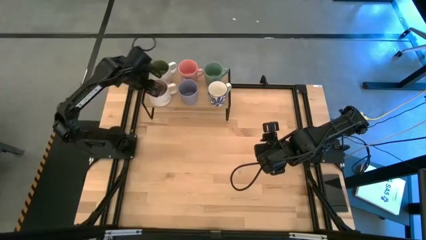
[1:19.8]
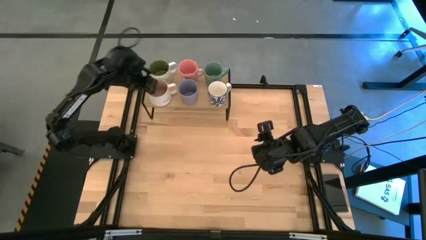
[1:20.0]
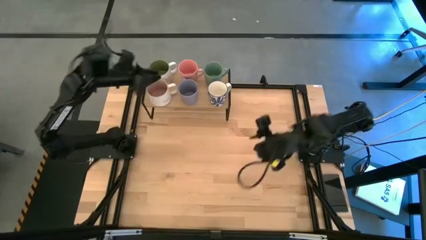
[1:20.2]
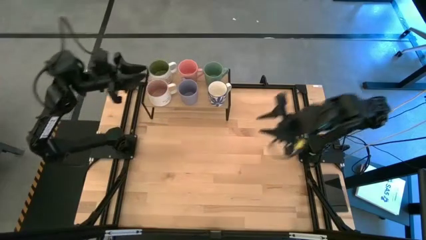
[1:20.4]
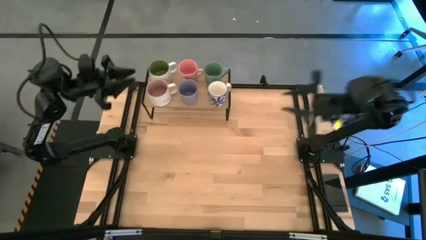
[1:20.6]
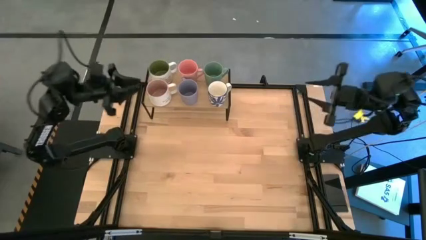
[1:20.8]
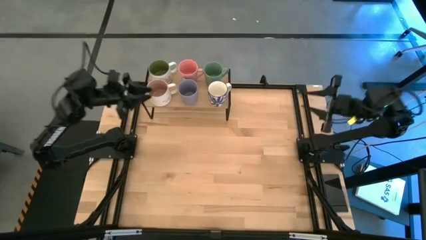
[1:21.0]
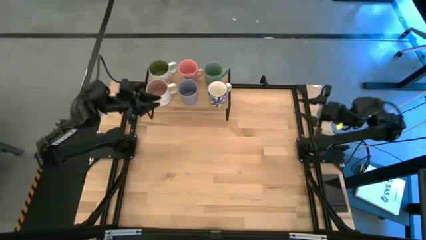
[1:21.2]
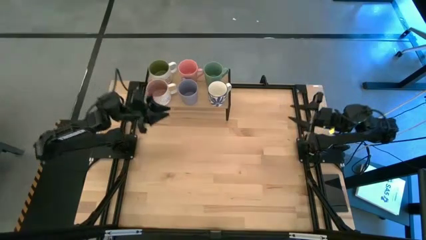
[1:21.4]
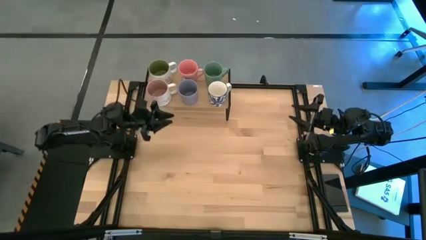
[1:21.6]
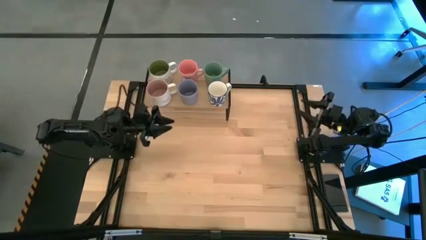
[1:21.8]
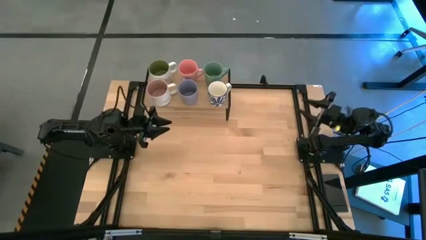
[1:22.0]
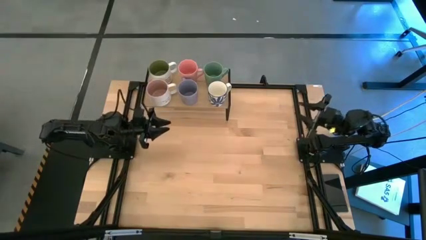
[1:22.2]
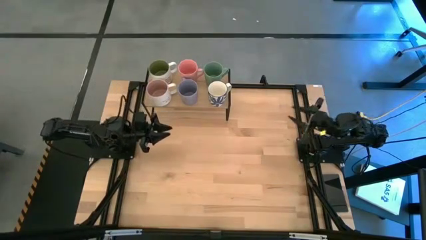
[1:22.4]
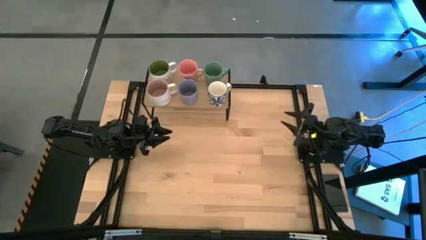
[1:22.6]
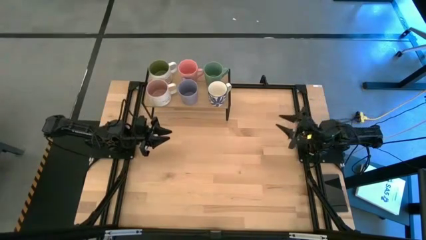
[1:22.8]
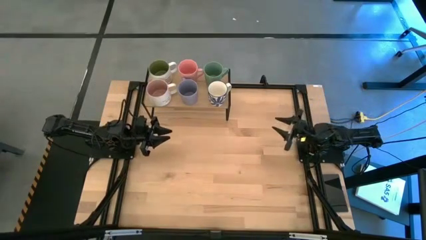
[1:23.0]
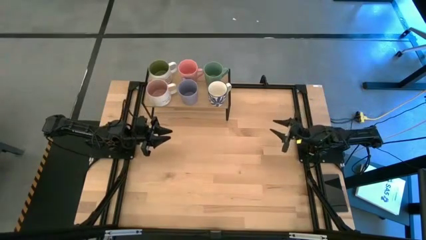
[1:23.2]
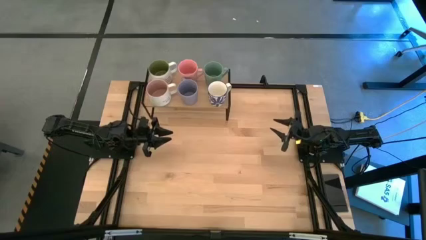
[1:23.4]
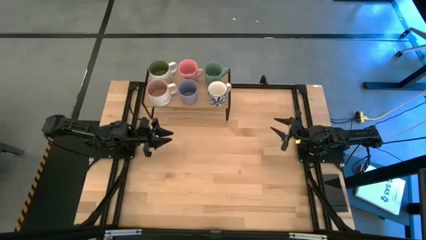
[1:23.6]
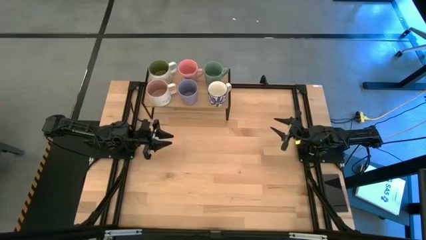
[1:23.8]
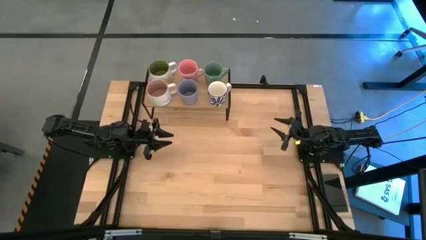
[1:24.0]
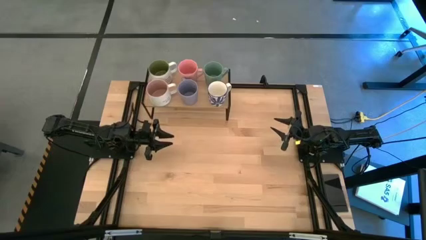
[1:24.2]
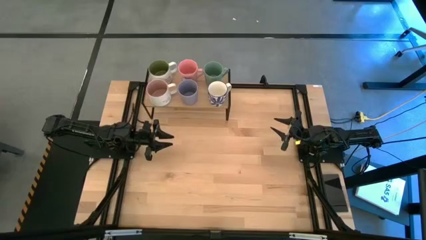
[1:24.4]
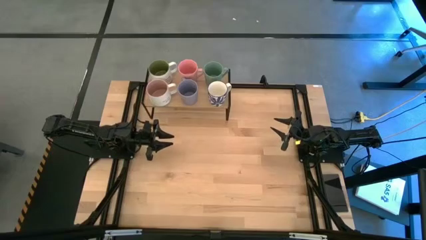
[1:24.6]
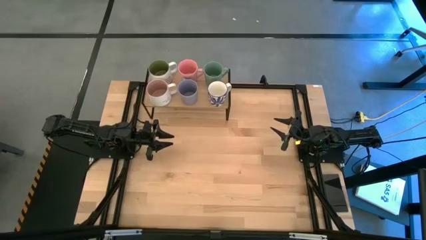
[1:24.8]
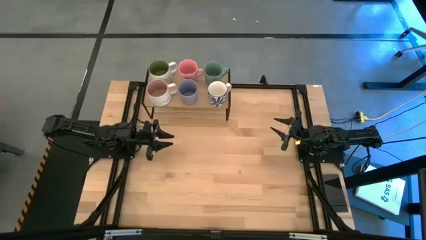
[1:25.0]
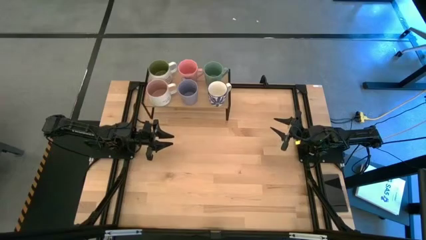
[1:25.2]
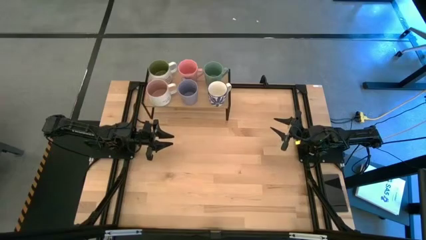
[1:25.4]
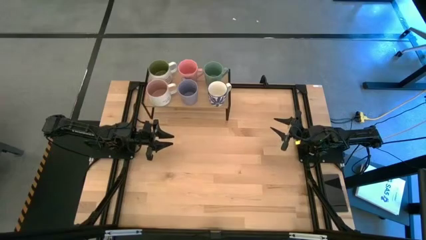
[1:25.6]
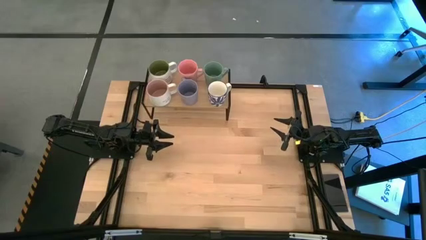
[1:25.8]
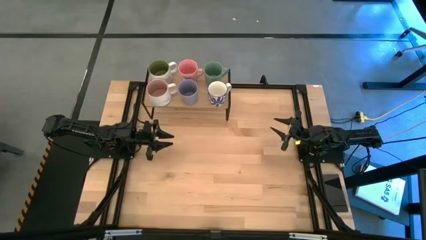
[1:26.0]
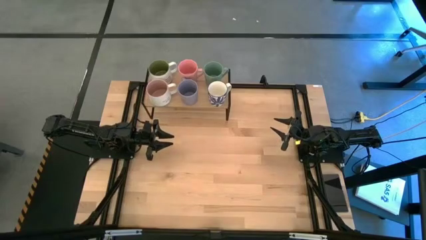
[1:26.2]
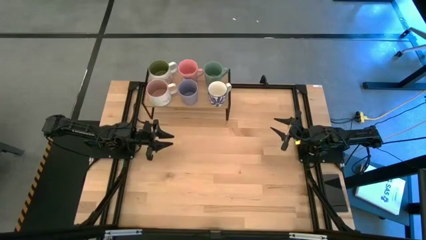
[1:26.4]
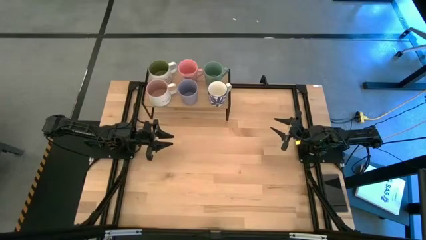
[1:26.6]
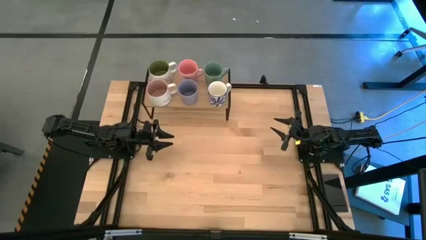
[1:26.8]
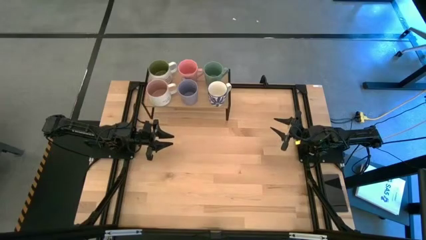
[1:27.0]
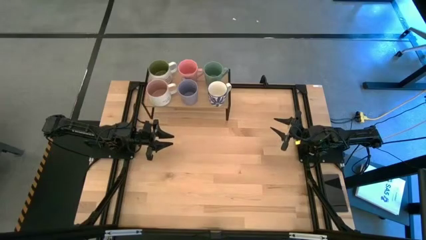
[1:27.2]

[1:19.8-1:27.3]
Task: Place coffee mugs
Return to Home Position

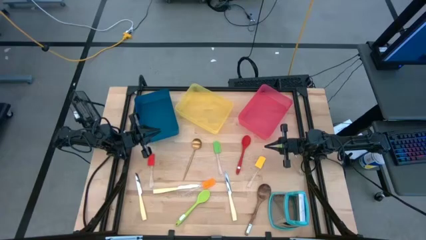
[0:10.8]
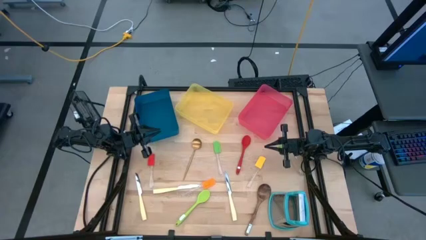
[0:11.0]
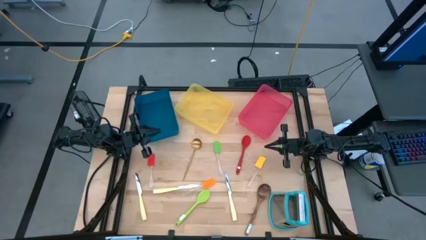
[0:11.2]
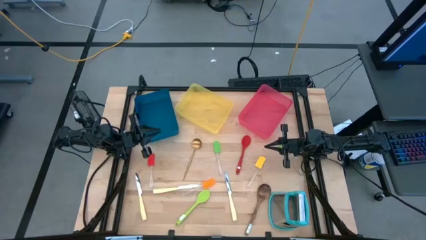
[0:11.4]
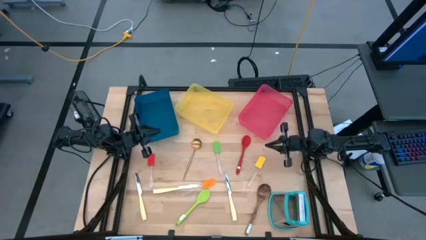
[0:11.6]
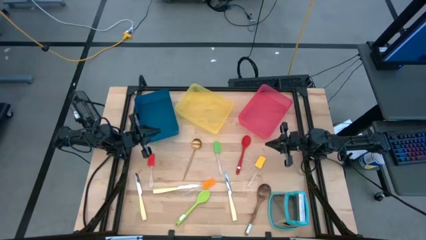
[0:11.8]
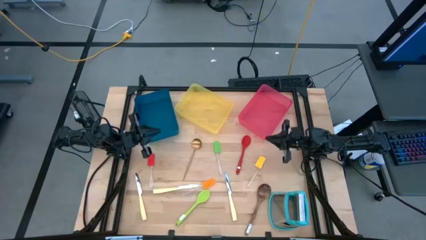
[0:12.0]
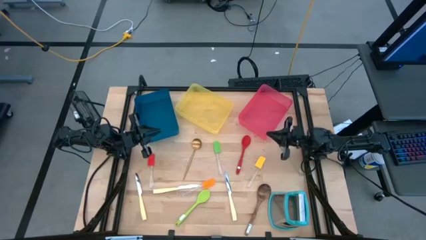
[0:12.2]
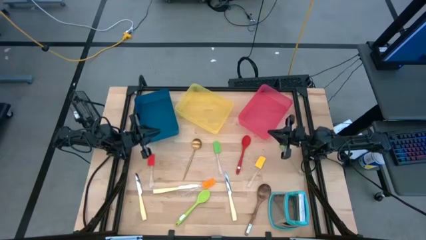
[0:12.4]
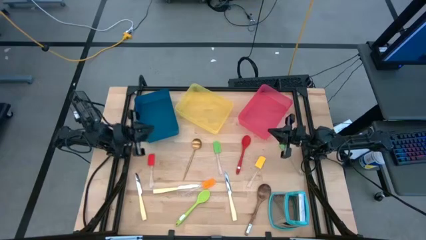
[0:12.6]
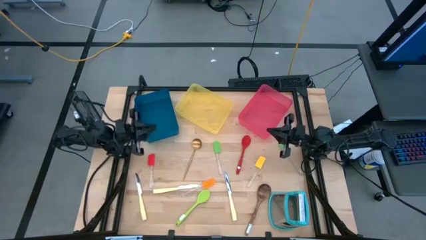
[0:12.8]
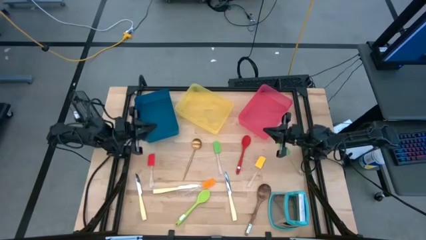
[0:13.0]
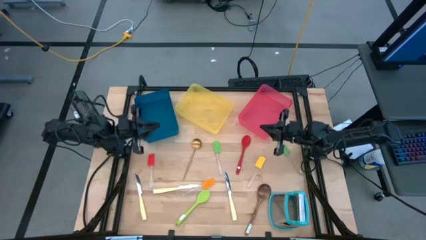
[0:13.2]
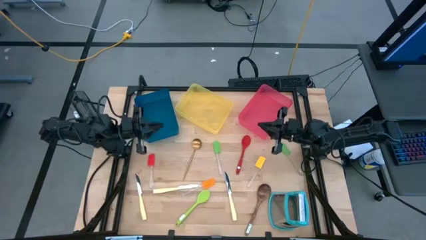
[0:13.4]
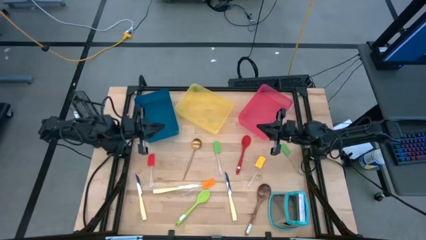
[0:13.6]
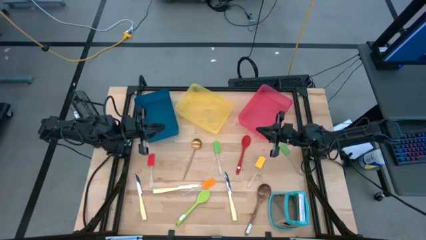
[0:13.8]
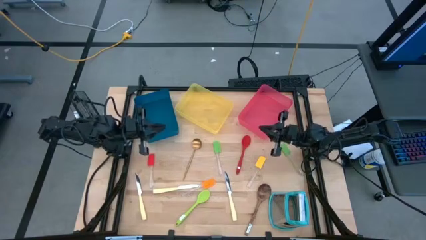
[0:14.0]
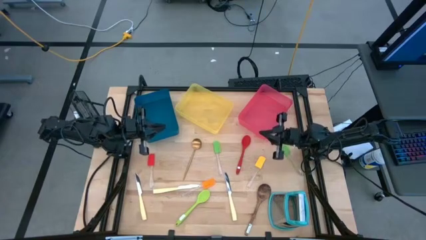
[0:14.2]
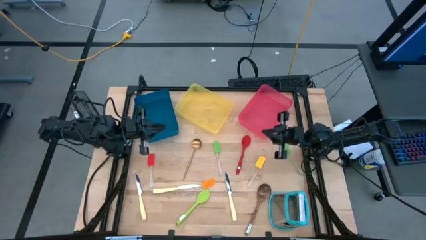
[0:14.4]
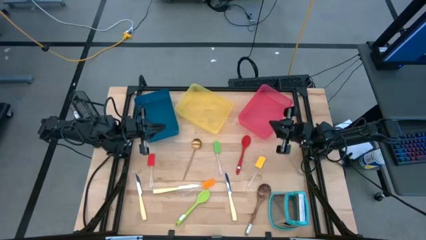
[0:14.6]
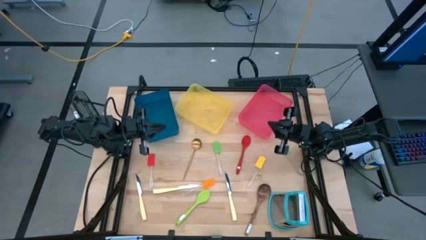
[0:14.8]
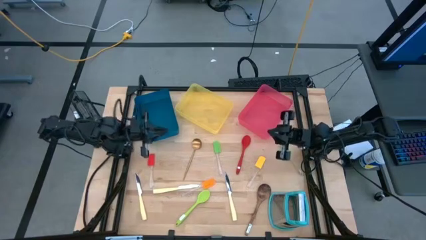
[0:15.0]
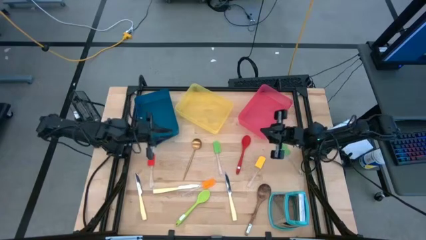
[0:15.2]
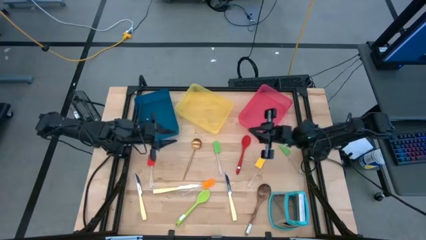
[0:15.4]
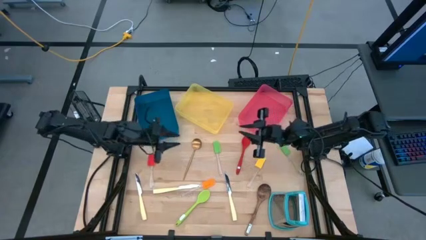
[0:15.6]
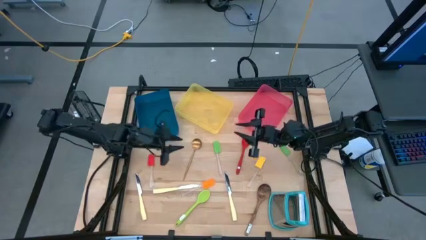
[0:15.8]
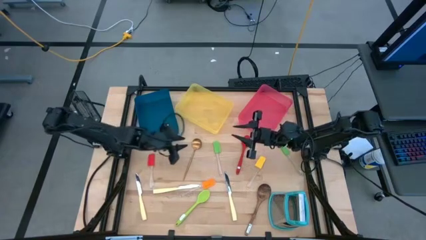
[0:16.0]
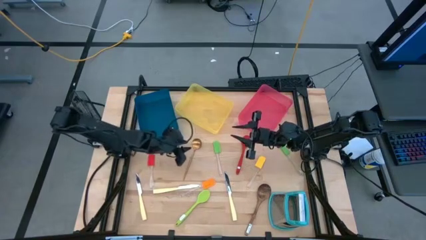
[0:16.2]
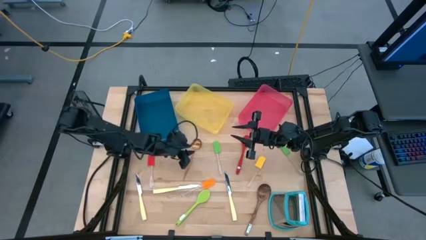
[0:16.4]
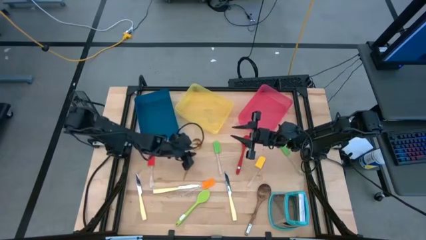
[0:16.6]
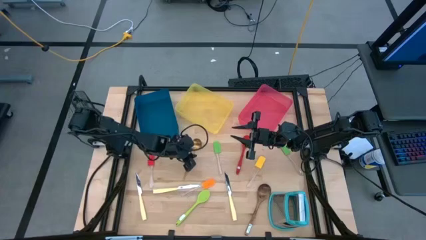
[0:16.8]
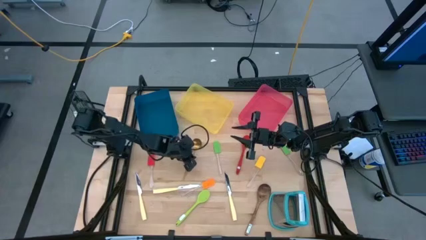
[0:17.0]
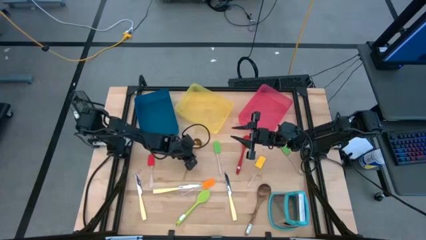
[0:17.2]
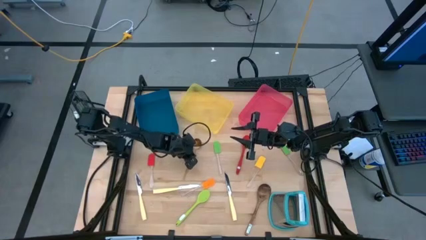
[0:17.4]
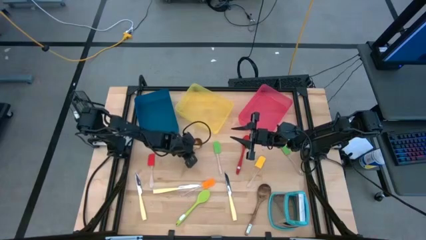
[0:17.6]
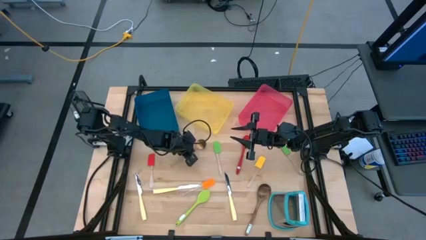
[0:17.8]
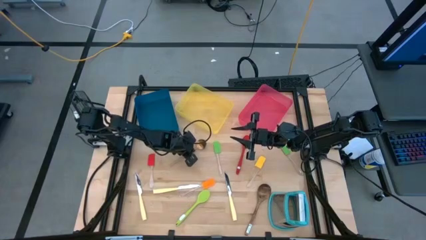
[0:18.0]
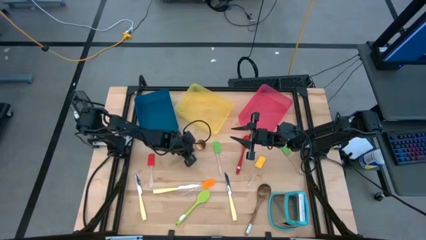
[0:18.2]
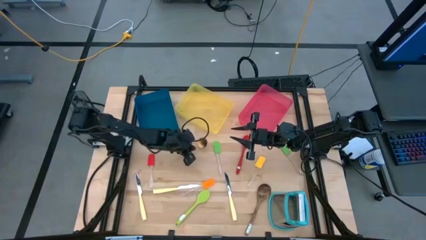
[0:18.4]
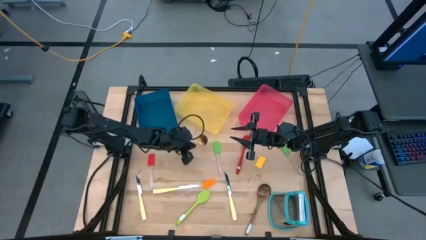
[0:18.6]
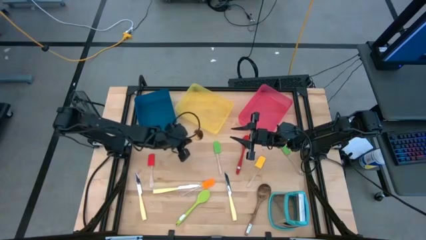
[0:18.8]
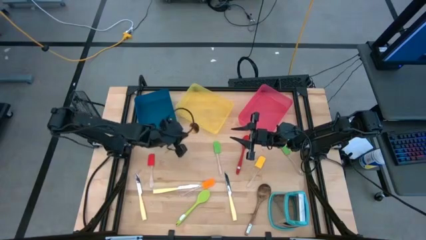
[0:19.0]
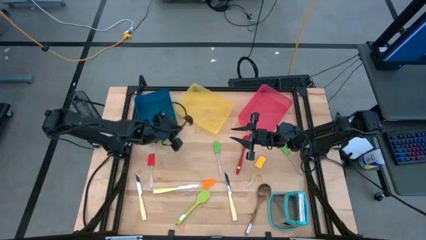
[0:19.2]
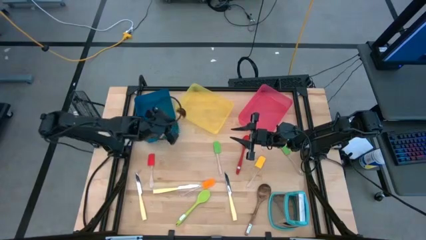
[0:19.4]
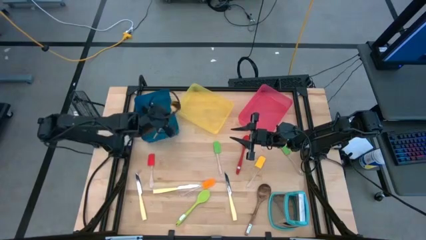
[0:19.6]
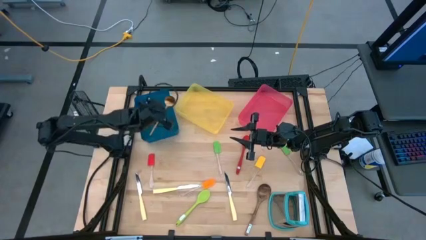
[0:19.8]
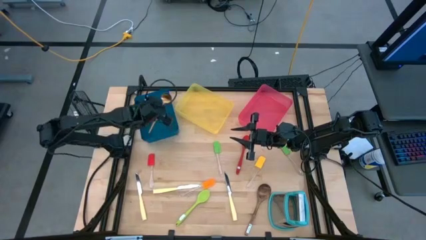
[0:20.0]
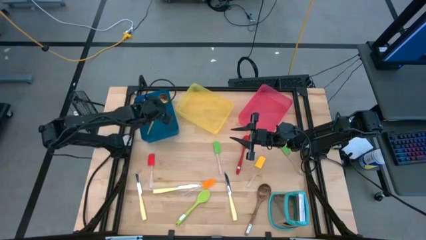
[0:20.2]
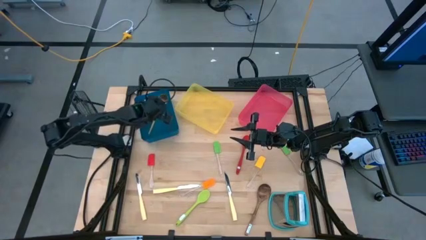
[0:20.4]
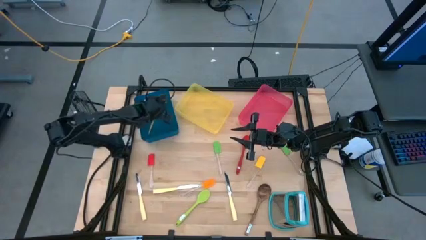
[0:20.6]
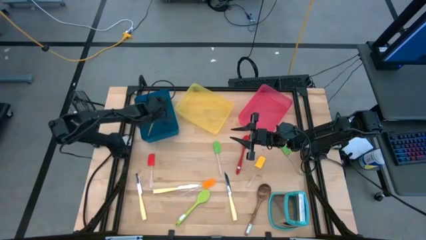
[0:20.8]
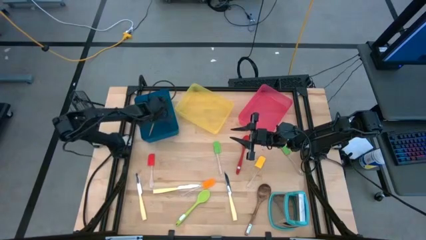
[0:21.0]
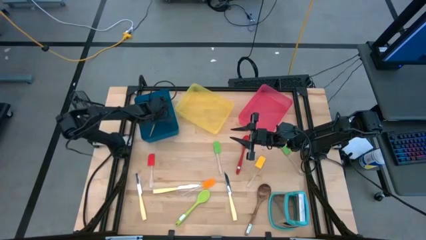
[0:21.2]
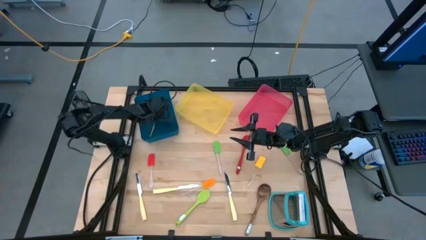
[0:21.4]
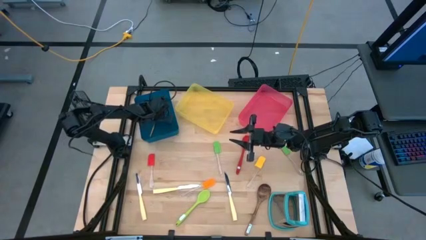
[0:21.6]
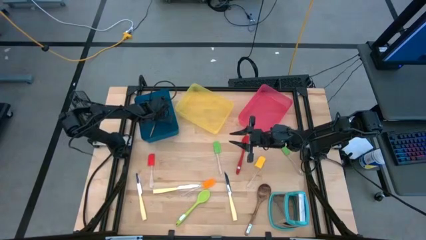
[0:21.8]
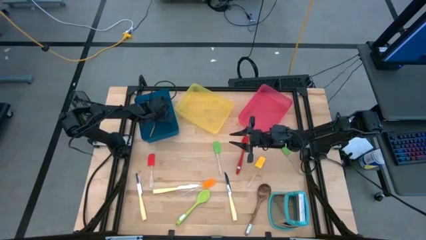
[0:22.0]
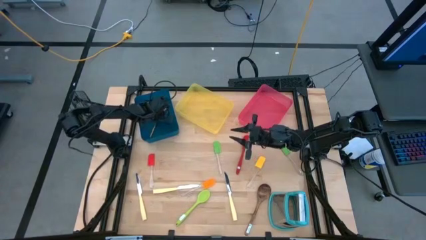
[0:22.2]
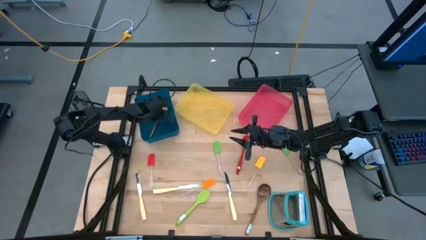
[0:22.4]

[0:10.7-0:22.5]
Task: Pick & Place Kitchen Items
Put the gold serving spoon into the blue bin
